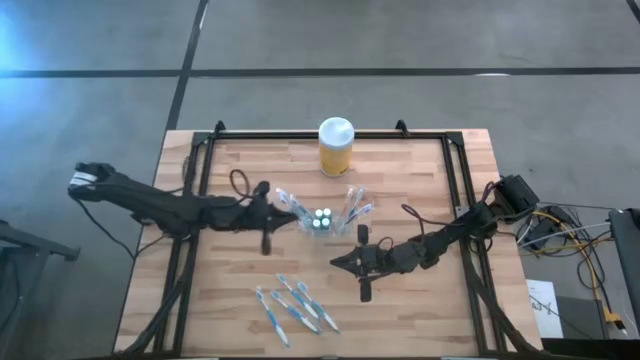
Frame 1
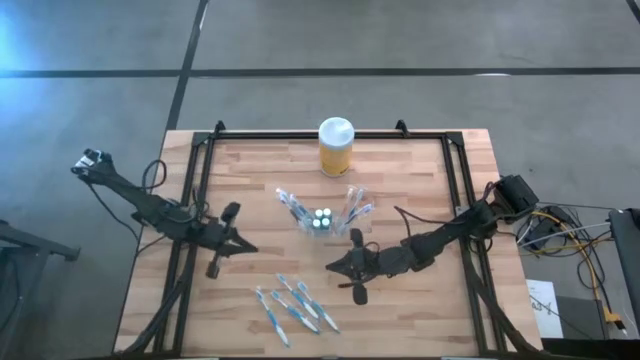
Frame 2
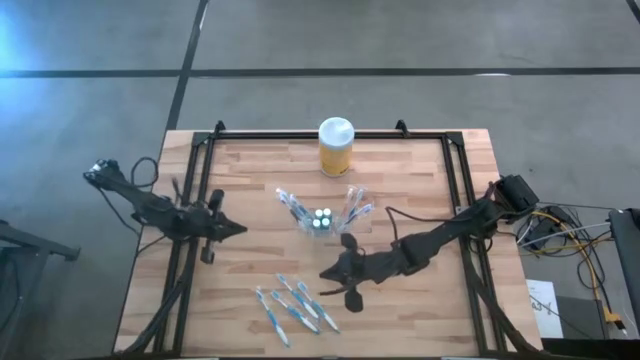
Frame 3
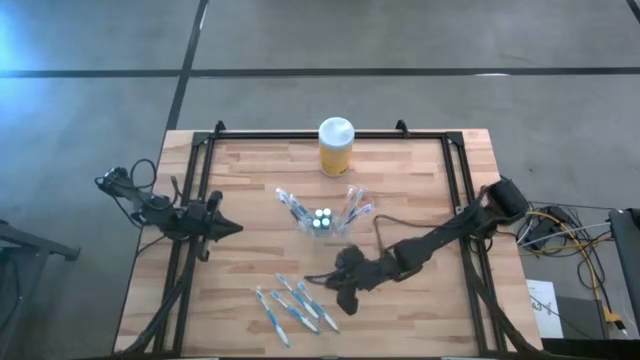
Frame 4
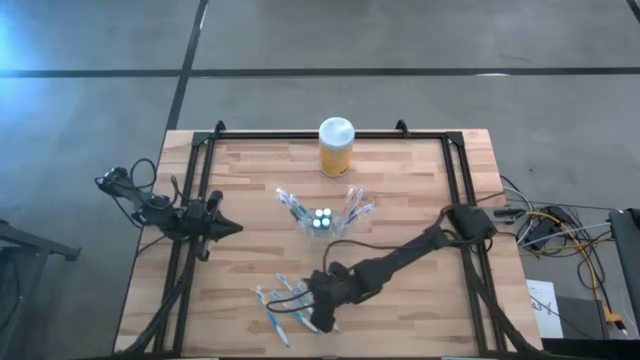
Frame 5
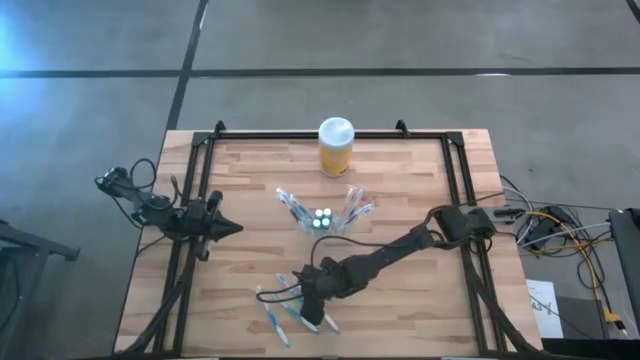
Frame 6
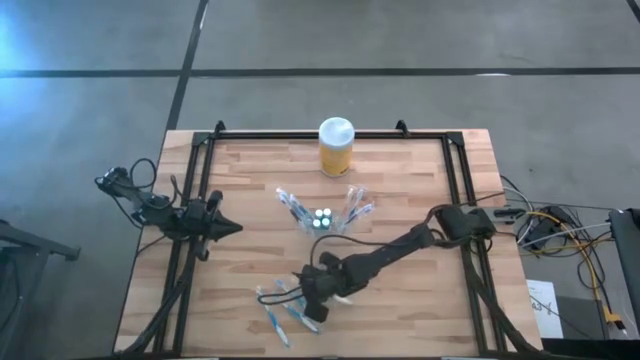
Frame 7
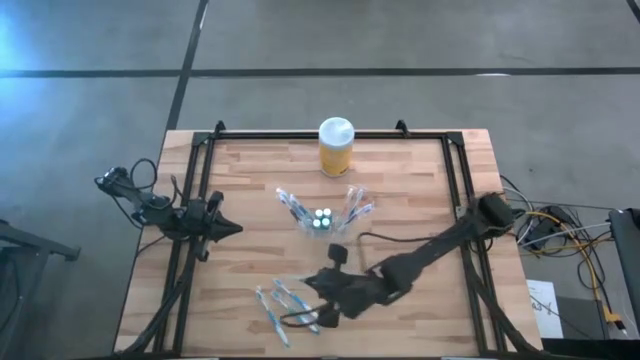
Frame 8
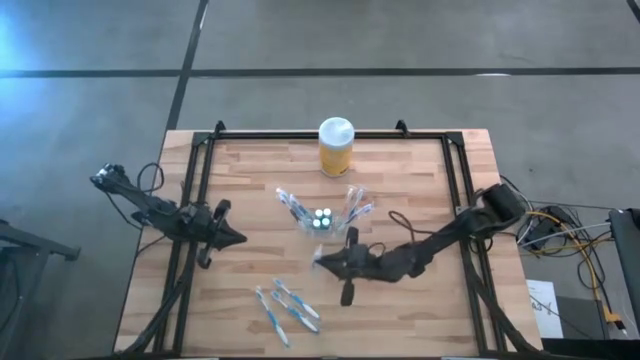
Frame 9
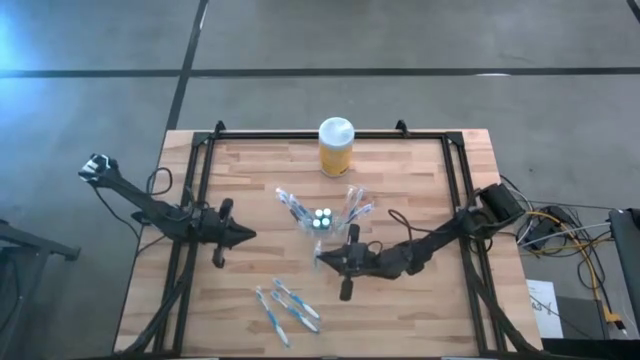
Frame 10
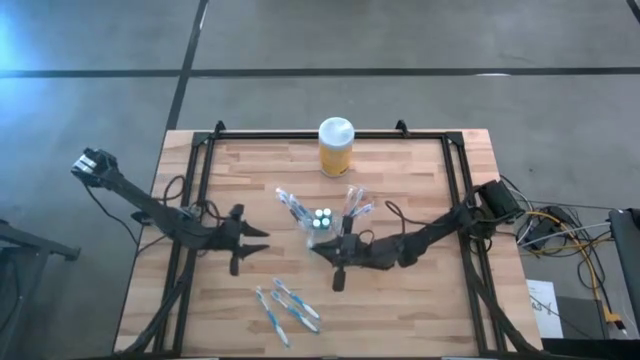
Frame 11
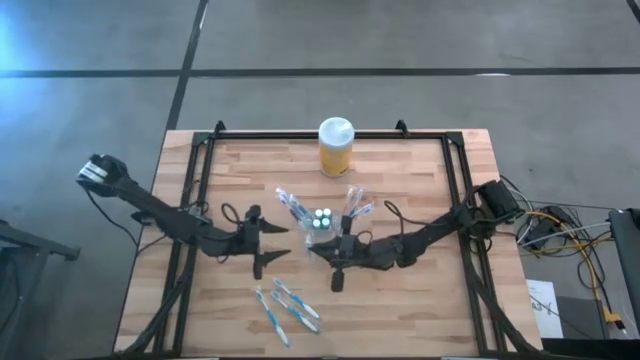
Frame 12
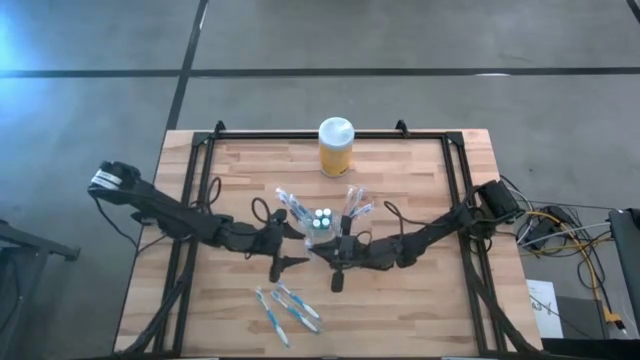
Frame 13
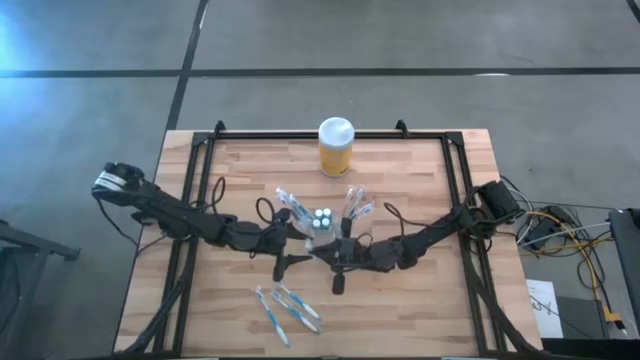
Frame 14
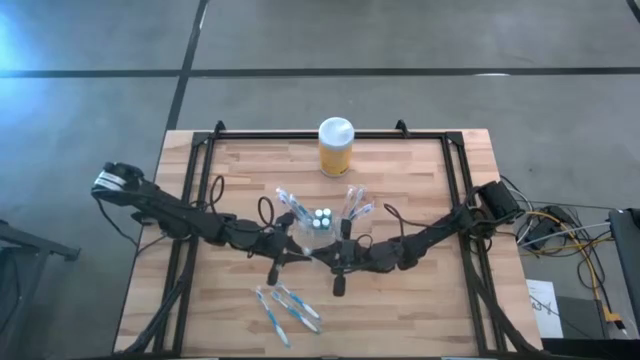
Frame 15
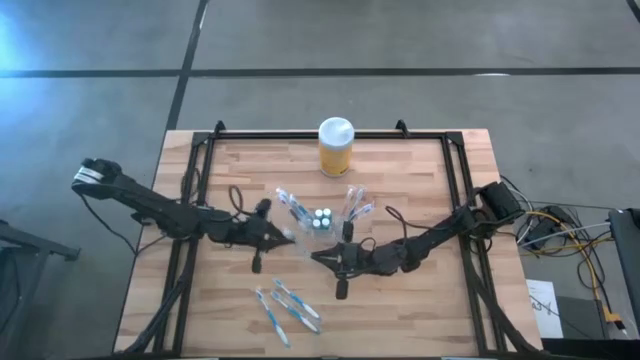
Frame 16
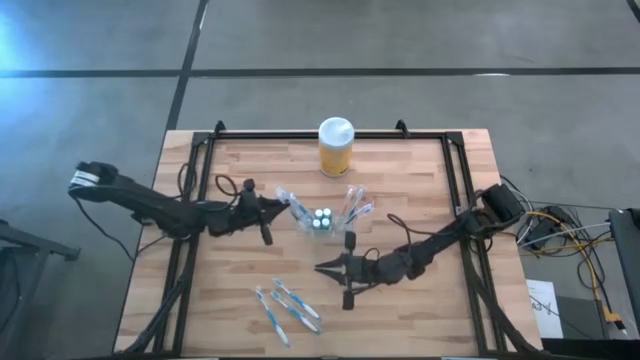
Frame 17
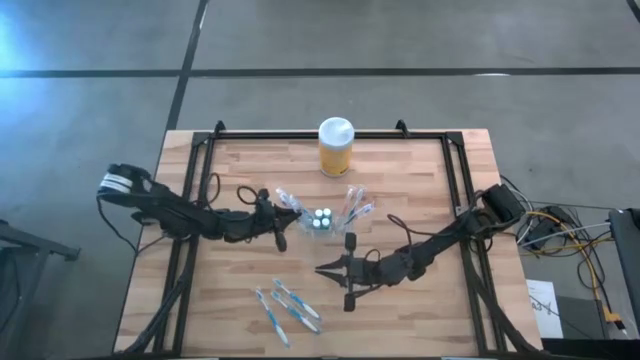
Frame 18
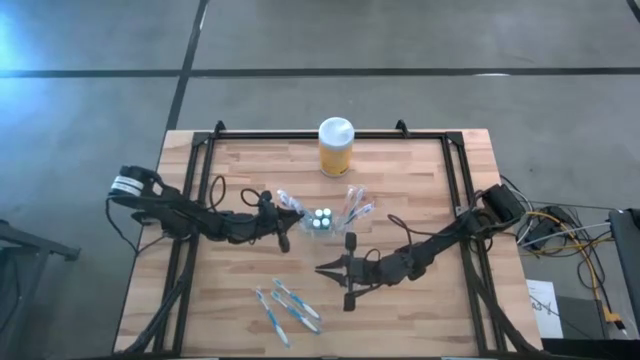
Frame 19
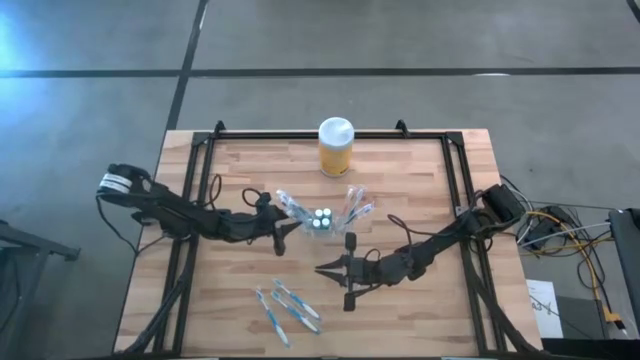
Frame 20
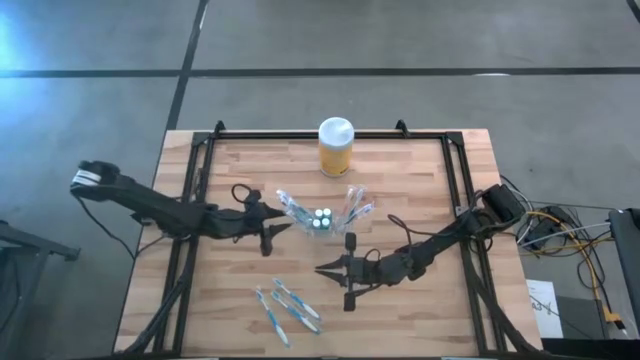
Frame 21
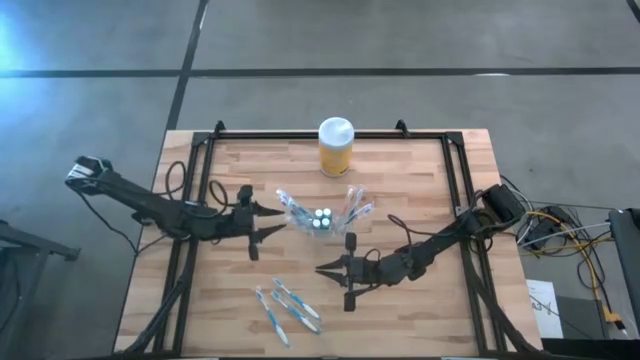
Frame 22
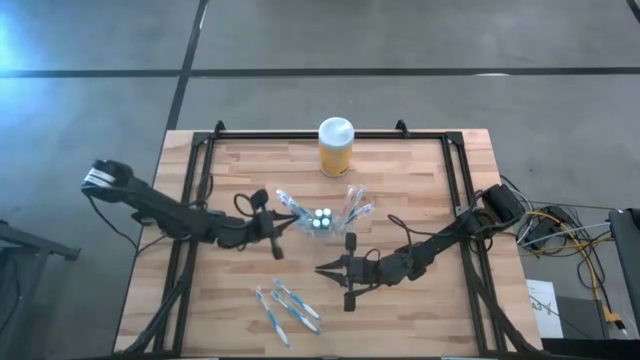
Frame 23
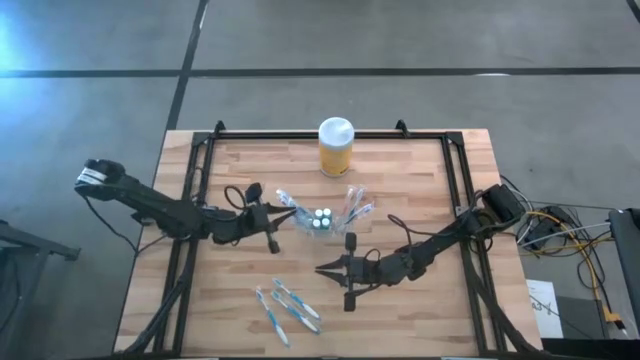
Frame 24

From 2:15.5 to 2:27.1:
Task: Pick & Place toothbrushing station
Put the blue toothbrush into the transparent organizer

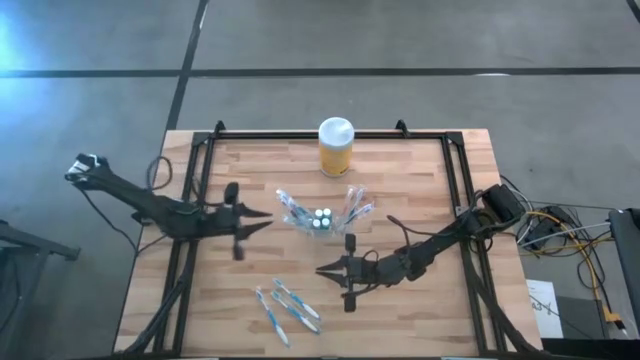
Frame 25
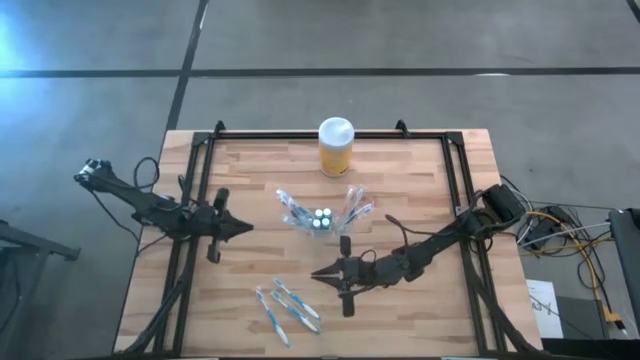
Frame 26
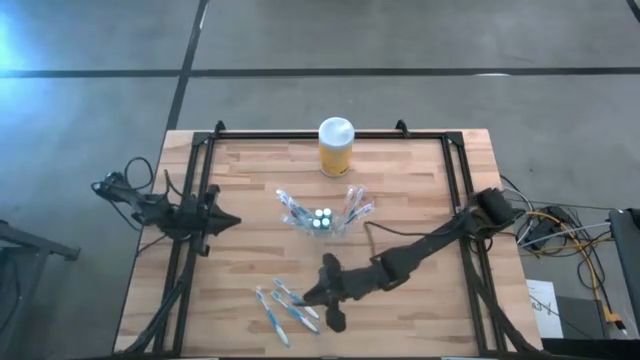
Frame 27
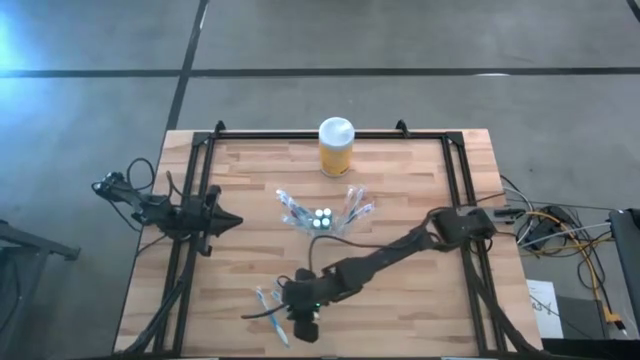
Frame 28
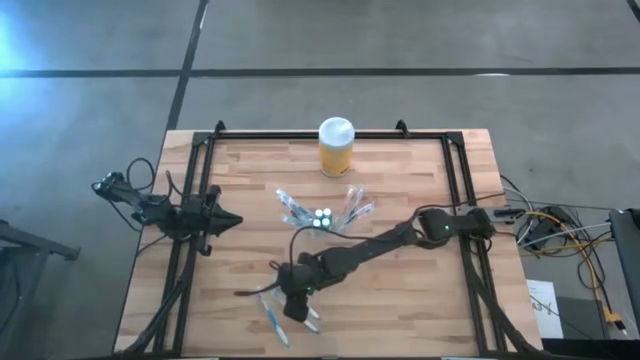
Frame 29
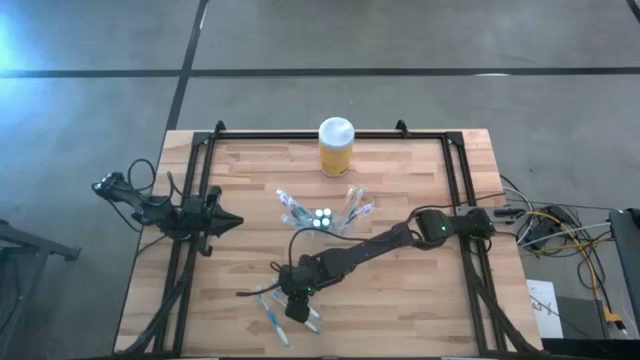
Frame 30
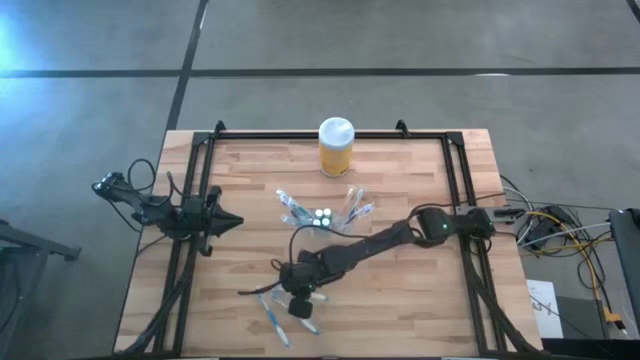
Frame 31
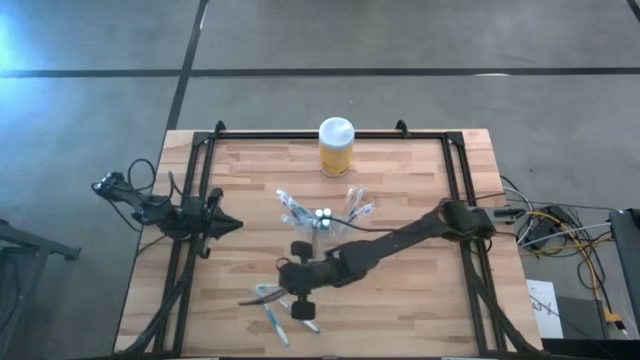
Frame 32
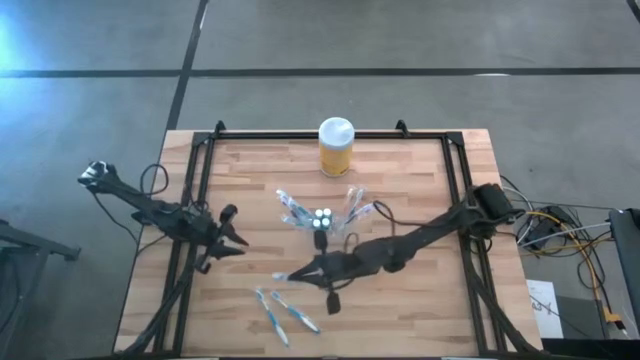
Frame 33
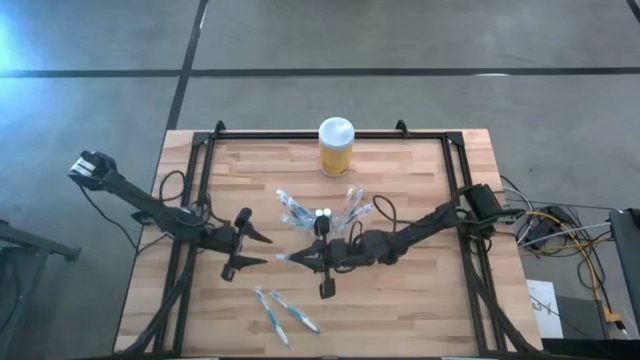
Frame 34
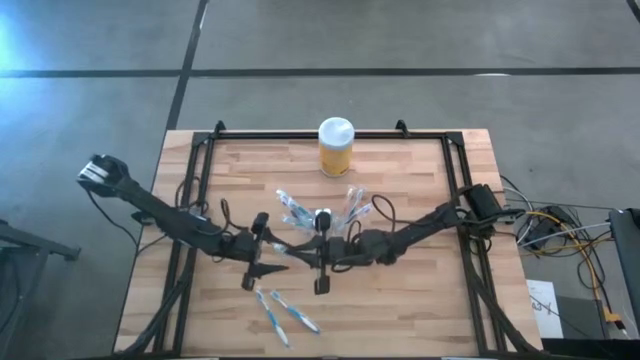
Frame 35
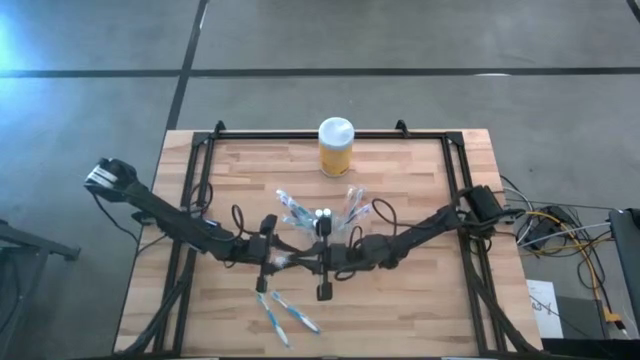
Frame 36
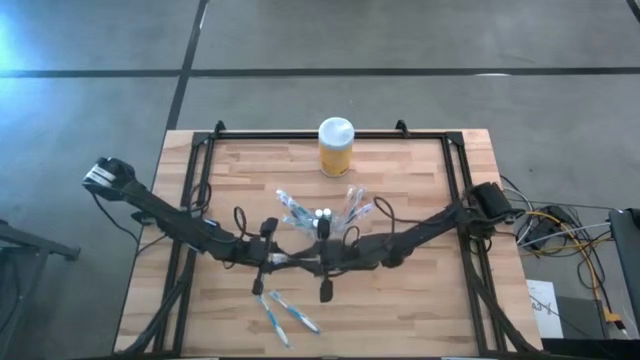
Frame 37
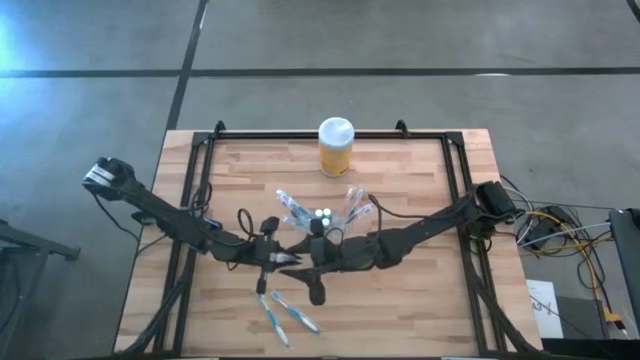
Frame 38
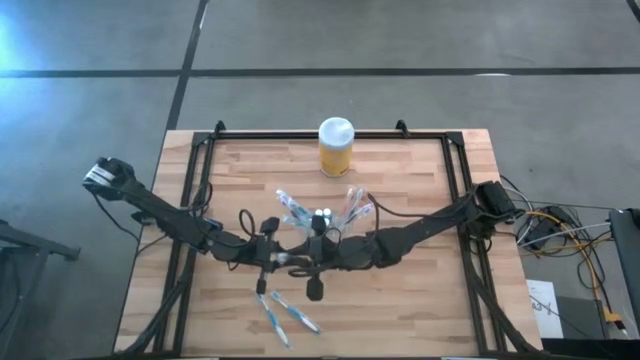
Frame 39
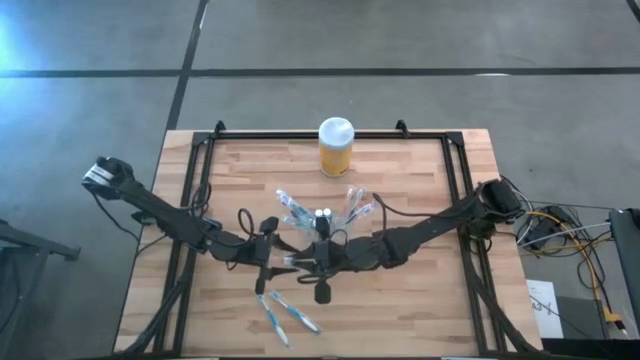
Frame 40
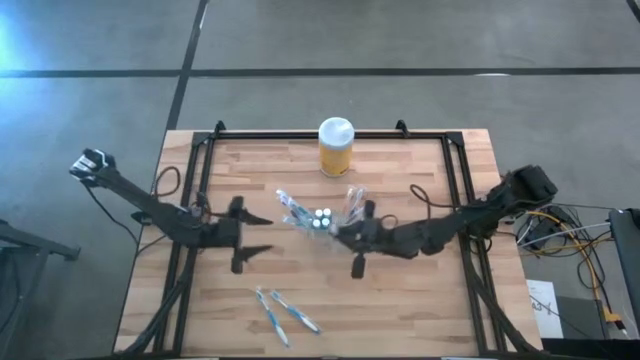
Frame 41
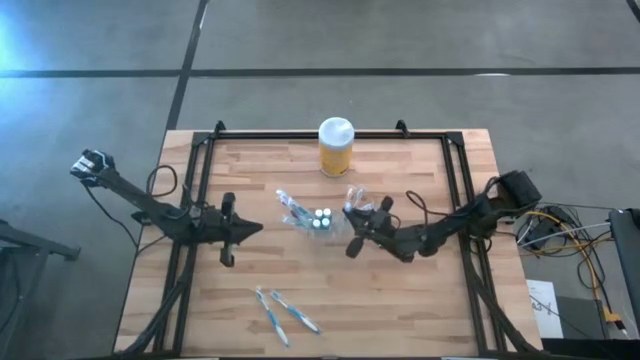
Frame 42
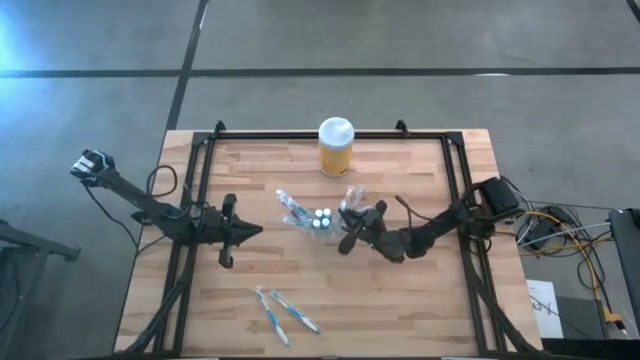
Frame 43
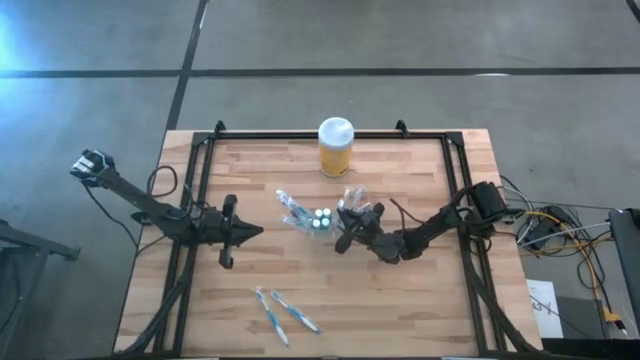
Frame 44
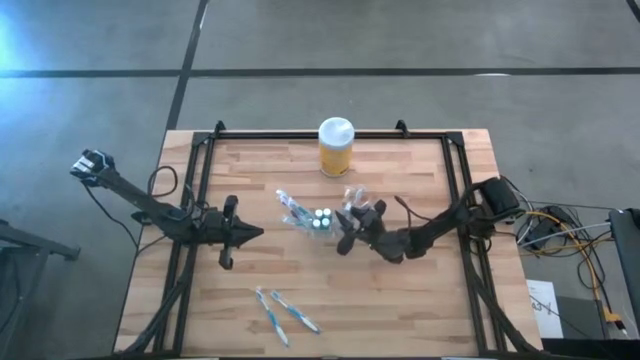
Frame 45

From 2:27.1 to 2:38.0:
Put the blue toothbrush into the transparent organizer
